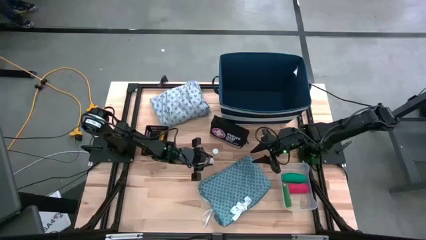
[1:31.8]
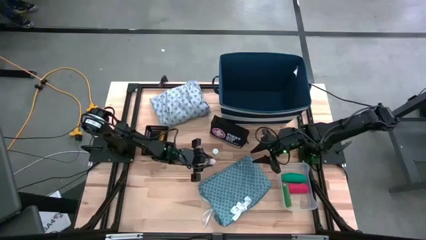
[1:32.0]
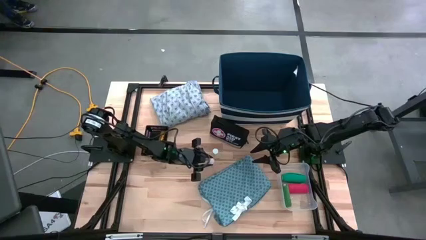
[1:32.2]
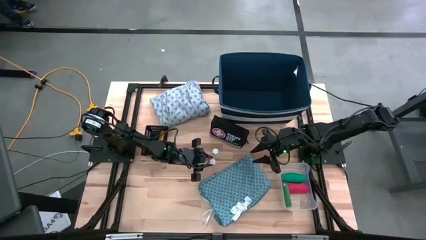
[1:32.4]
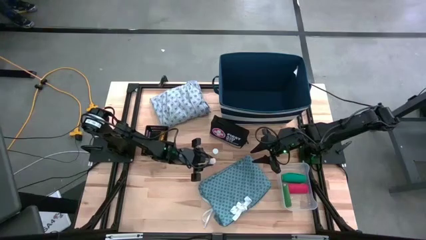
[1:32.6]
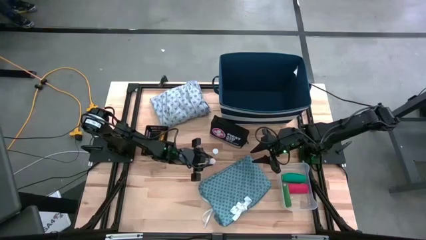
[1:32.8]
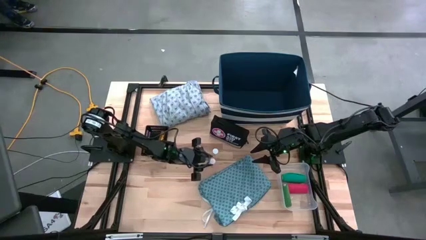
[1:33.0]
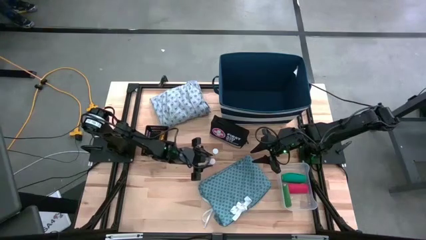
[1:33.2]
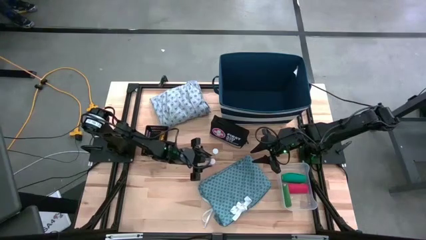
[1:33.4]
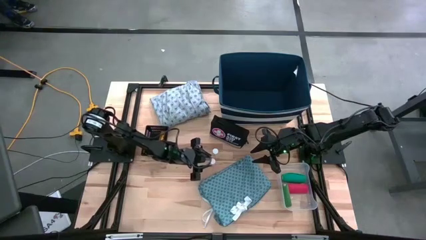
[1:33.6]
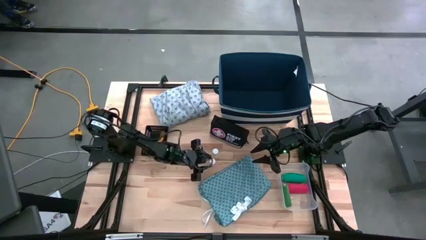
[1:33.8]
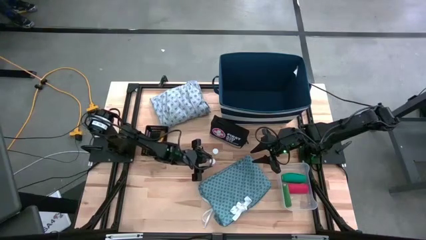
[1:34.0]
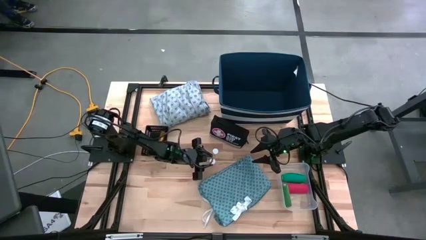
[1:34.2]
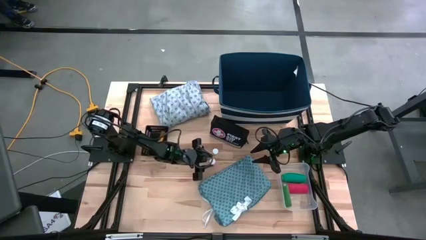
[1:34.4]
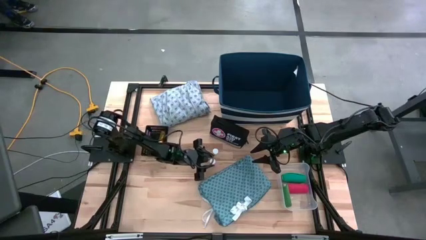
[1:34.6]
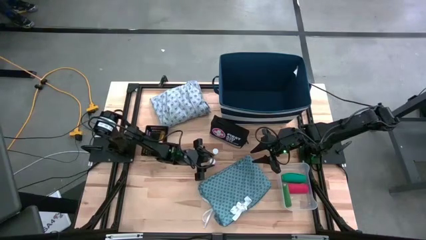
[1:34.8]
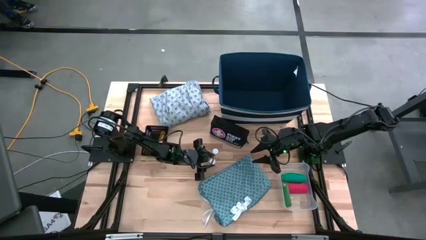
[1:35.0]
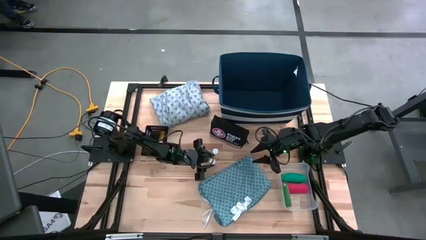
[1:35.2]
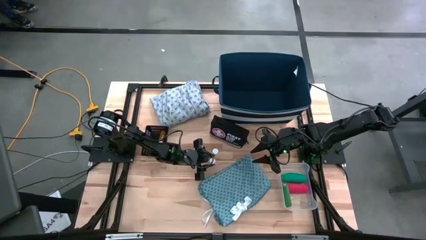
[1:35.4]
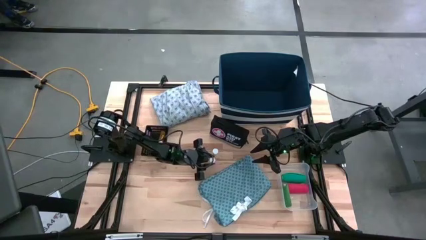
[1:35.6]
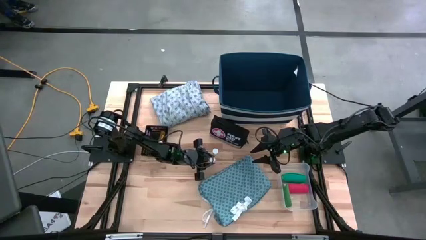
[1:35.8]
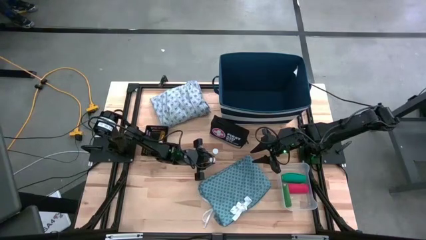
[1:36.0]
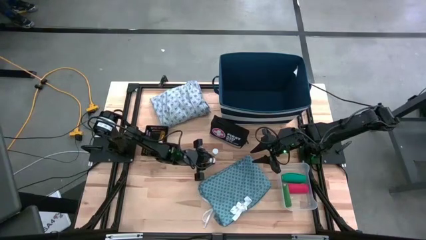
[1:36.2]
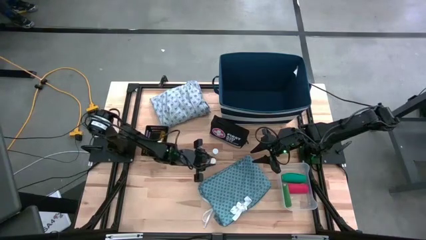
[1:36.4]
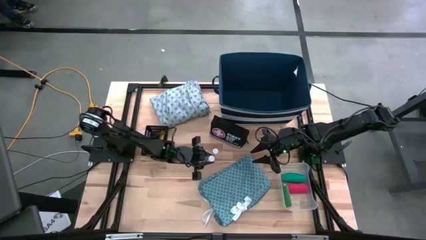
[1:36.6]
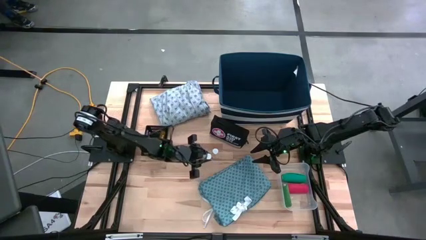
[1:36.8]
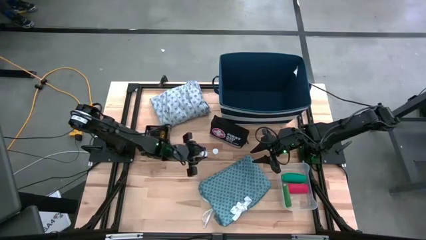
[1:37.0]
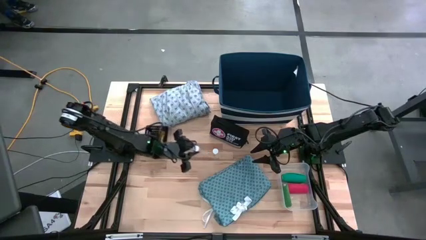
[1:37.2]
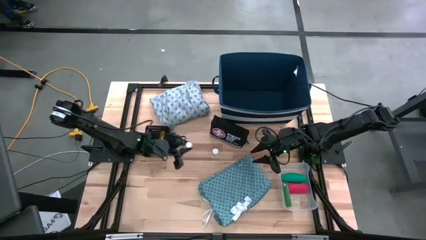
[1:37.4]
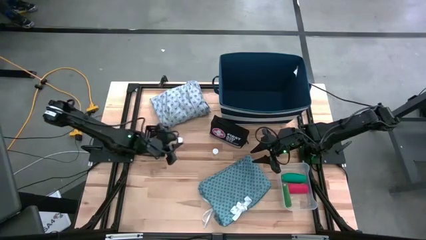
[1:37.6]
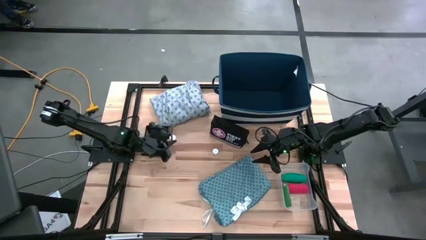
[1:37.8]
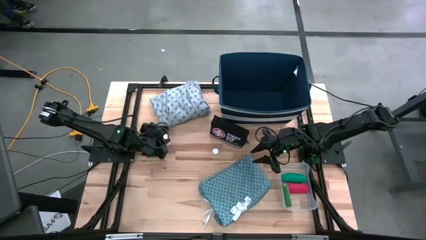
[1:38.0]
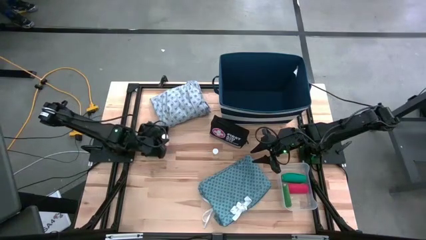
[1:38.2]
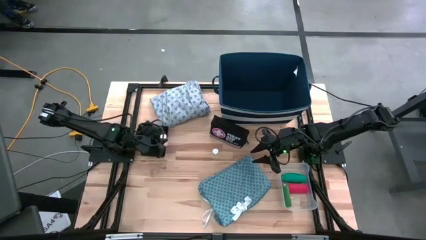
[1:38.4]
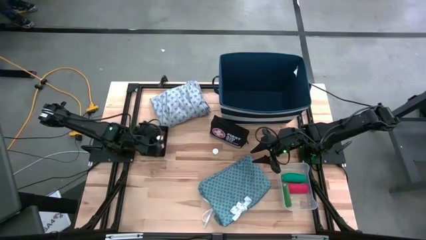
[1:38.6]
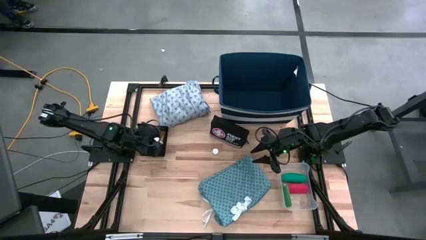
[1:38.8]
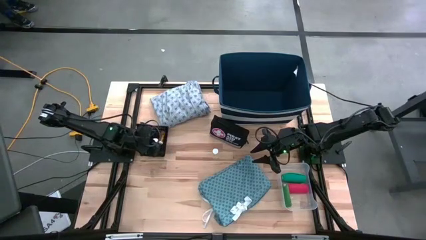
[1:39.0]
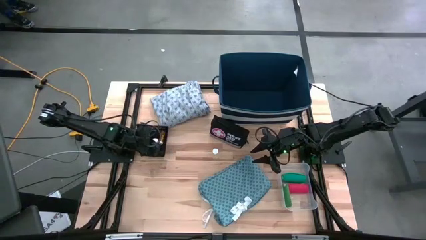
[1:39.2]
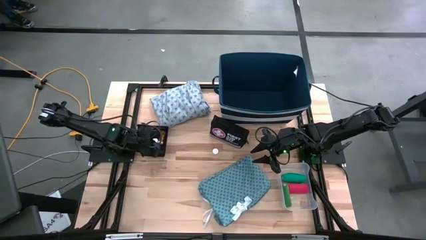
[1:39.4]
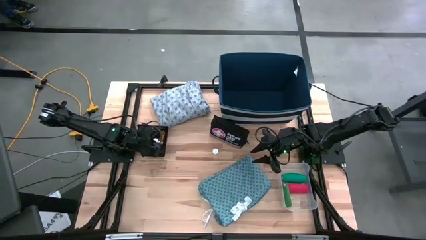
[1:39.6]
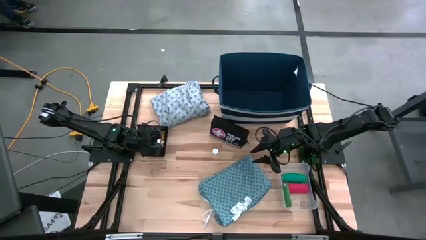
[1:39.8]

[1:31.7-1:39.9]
Task: Pick & place medical supplies in basket/bin
Put the pink pill bottle into the black bin

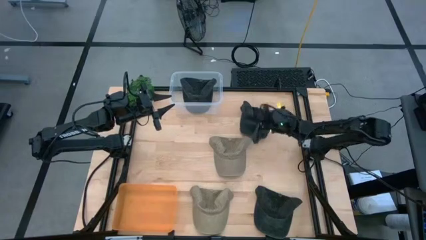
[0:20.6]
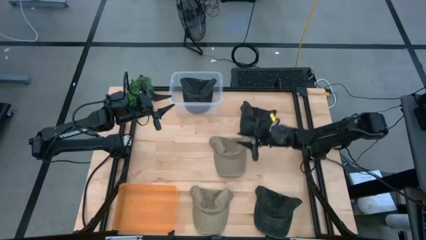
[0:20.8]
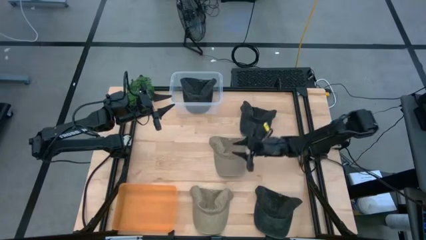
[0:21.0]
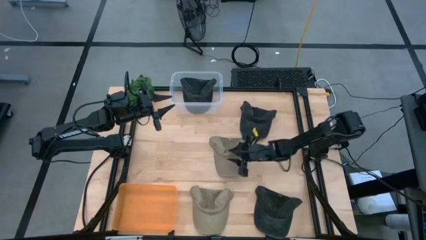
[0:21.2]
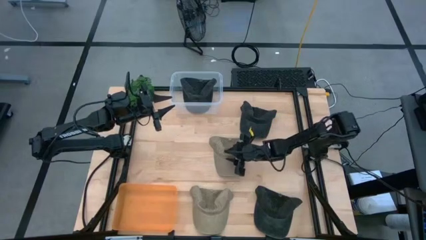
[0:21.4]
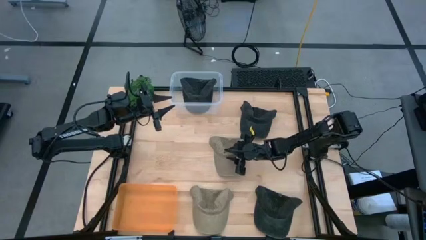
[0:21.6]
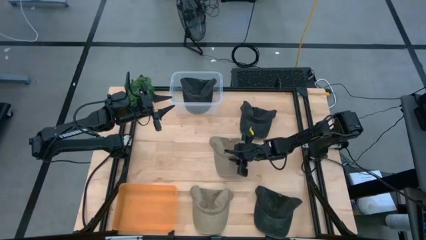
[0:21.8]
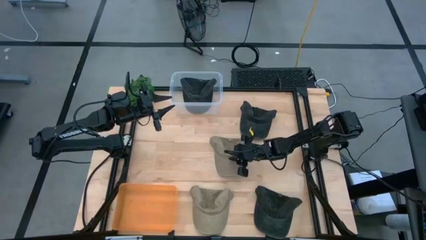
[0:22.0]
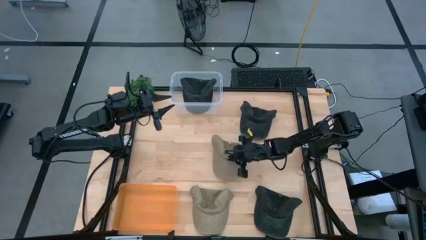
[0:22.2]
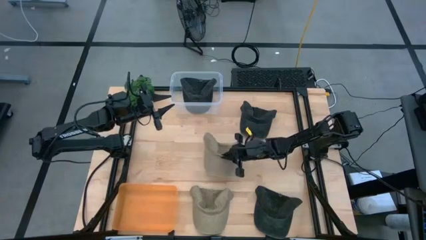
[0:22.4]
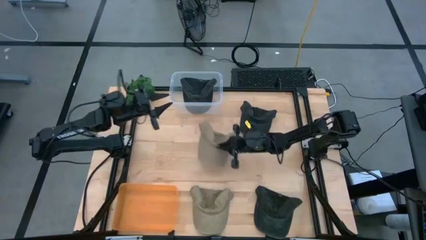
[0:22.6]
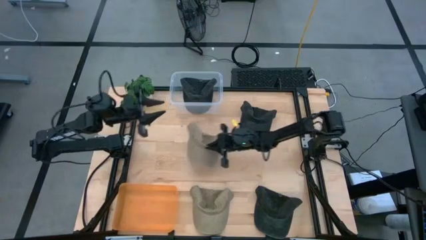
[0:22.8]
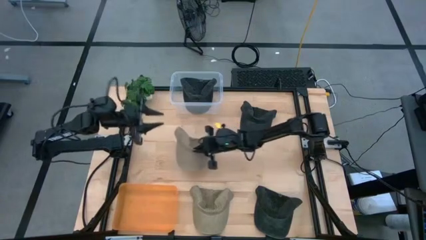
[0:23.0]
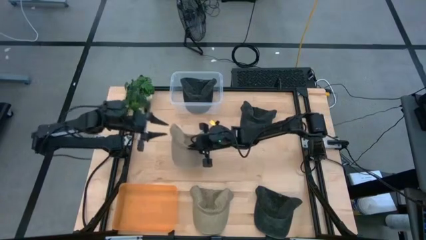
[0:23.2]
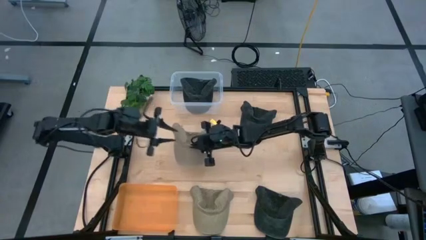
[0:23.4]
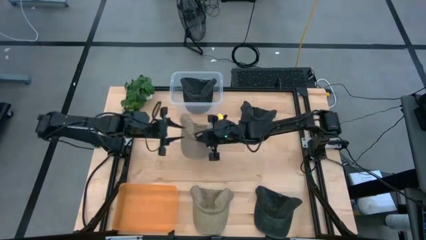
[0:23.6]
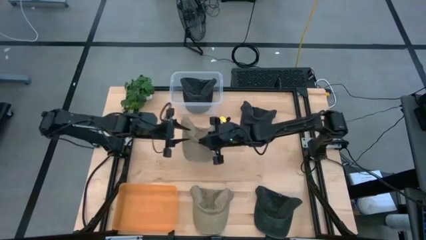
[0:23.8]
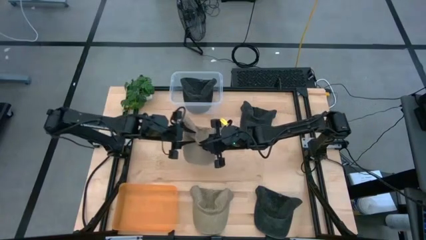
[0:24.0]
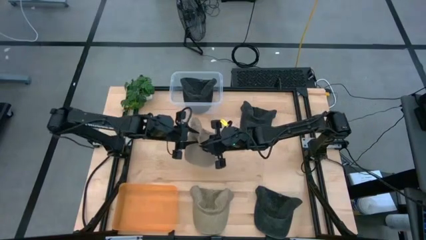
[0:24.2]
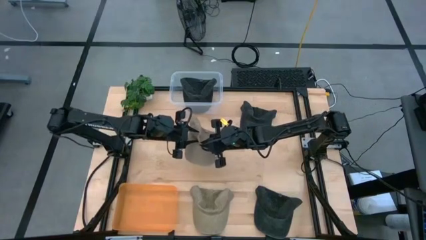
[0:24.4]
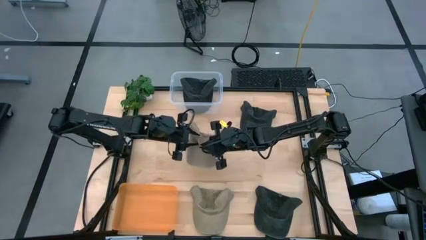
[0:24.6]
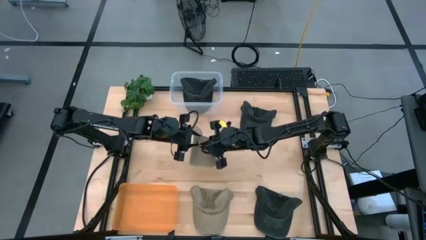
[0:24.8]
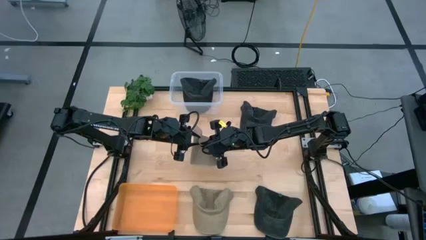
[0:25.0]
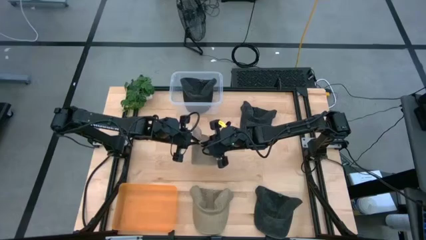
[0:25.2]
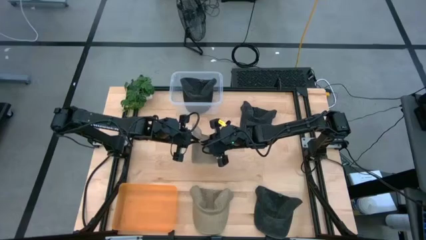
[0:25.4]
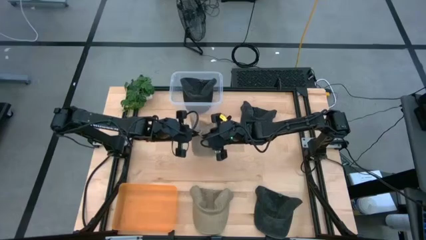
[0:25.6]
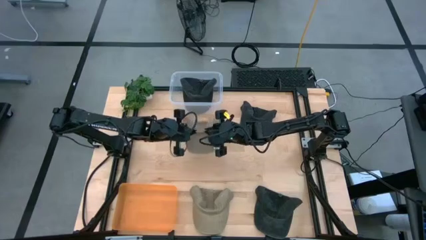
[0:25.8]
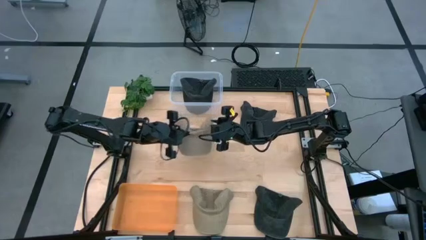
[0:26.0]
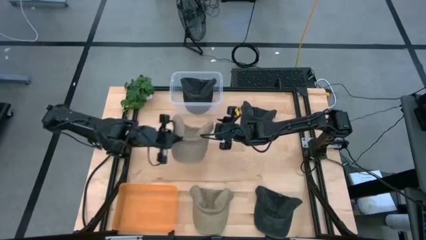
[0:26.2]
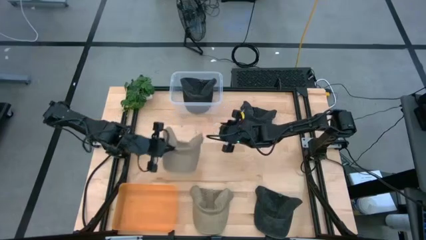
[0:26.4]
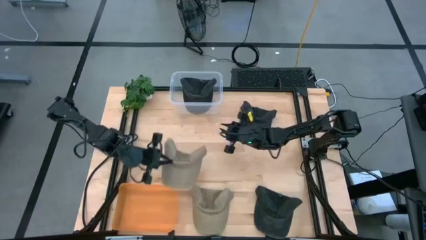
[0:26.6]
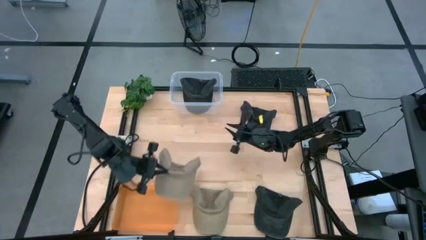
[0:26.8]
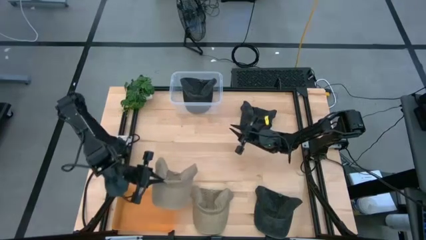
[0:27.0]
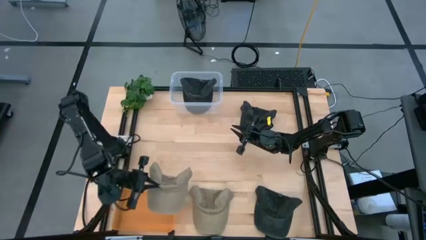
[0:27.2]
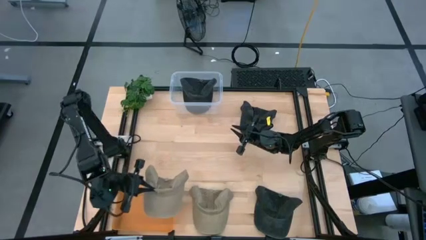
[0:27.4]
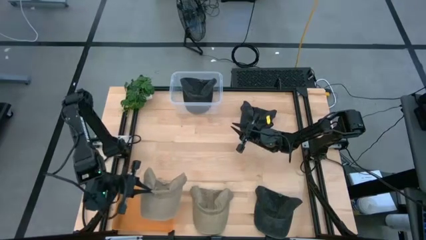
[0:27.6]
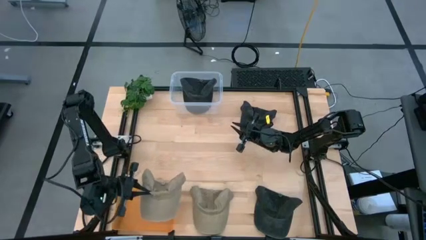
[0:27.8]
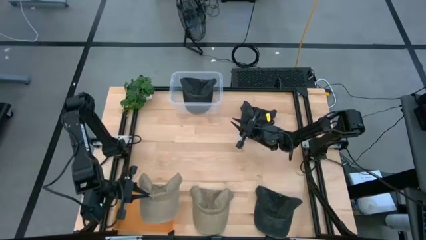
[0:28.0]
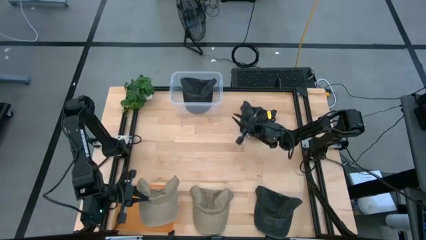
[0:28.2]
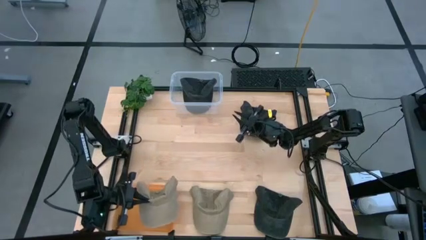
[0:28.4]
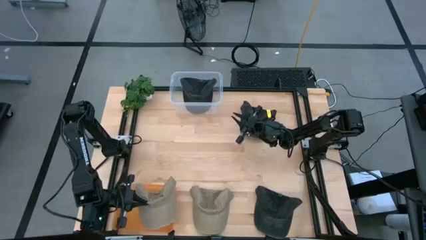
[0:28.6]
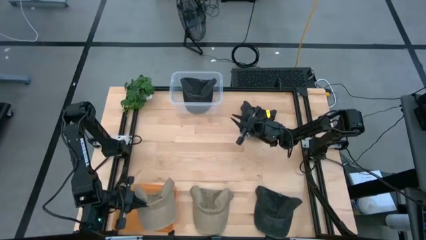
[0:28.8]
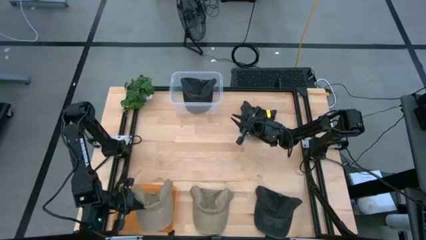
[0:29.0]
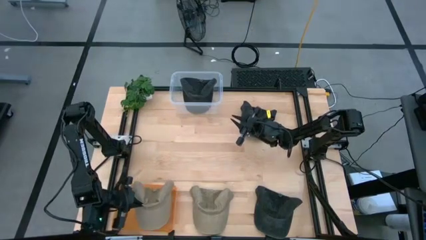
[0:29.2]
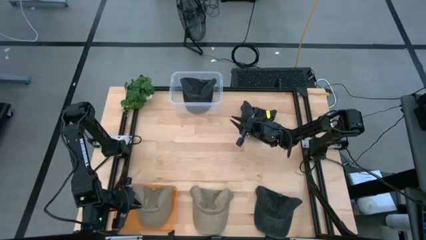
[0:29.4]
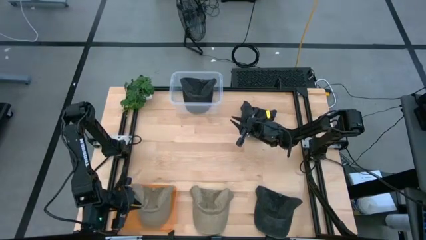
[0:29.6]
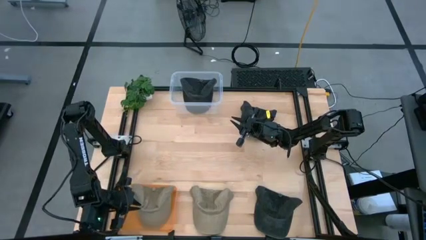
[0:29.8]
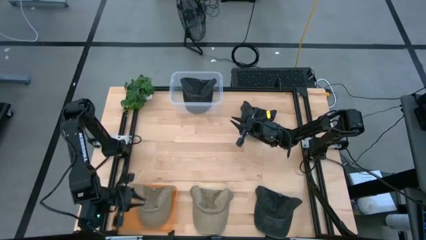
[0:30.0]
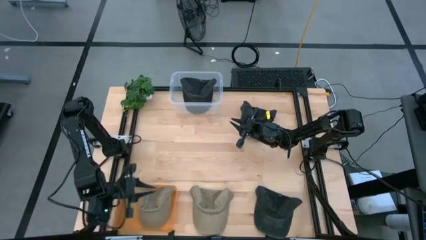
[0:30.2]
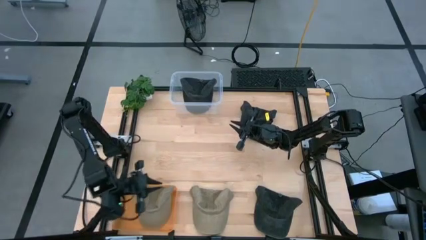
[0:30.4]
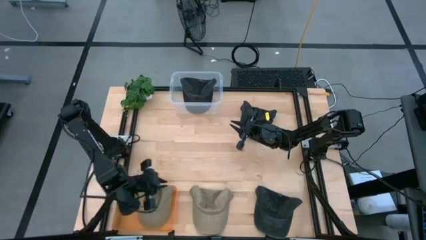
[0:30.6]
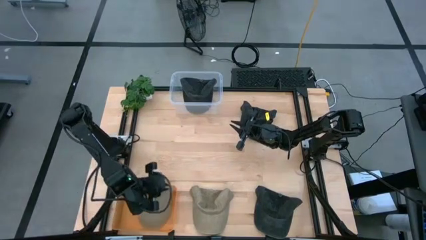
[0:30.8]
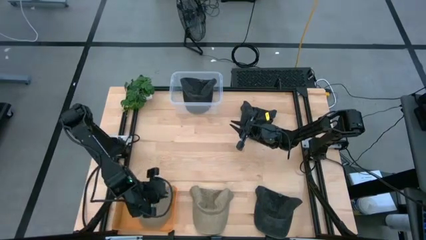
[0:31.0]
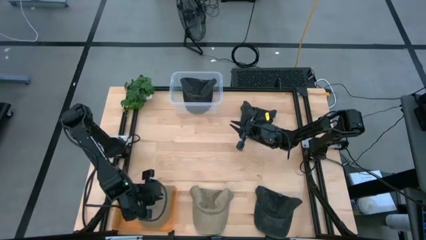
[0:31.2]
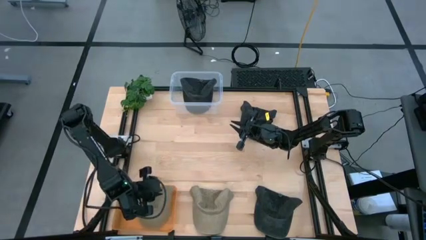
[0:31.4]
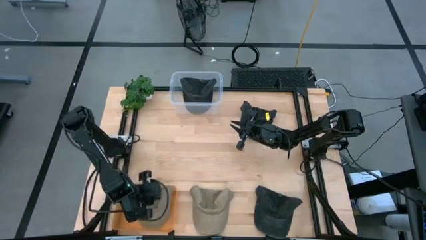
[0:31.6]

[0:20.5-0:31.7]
Task: Pick & Place hat
Put the top brown cap into the orange bin
